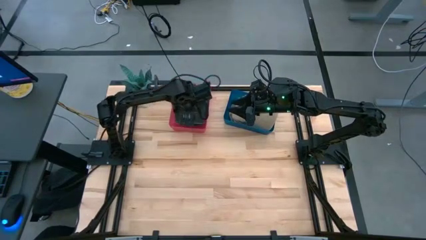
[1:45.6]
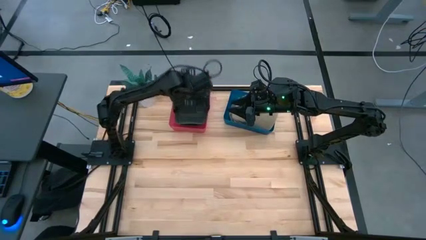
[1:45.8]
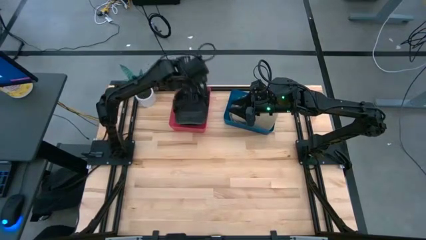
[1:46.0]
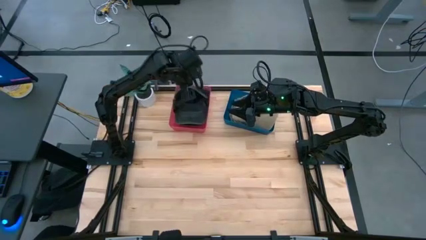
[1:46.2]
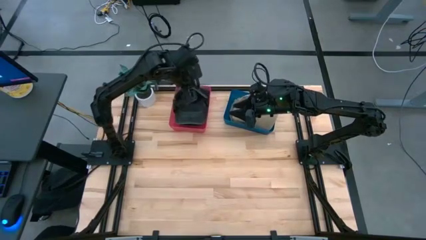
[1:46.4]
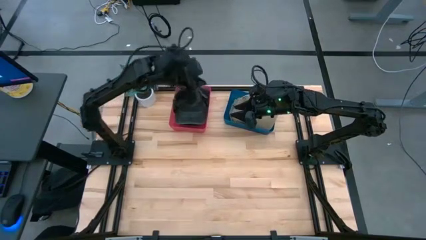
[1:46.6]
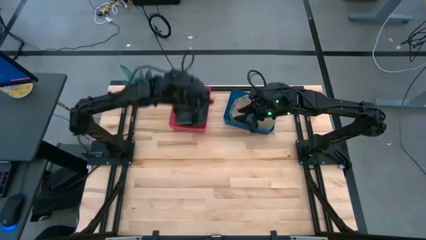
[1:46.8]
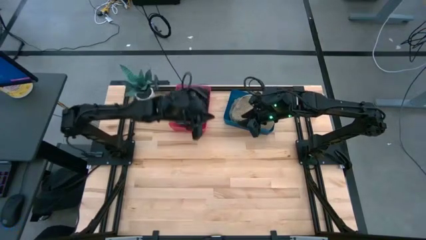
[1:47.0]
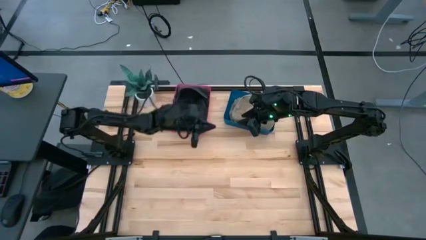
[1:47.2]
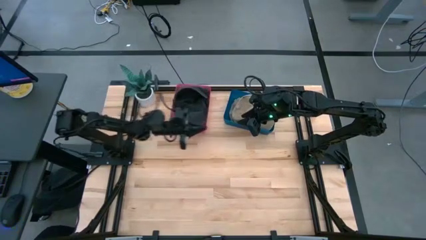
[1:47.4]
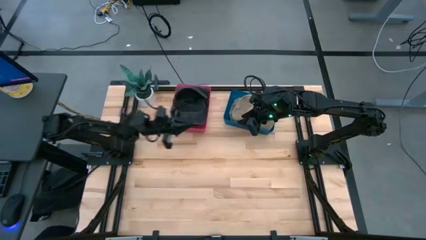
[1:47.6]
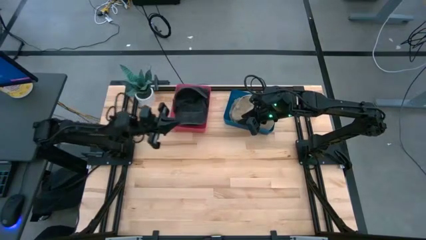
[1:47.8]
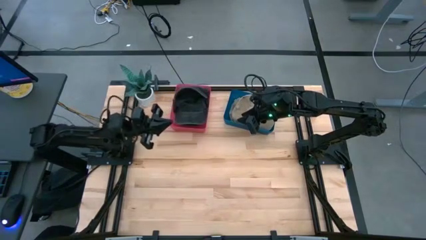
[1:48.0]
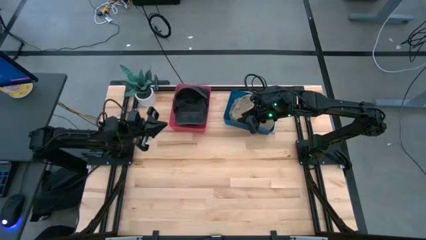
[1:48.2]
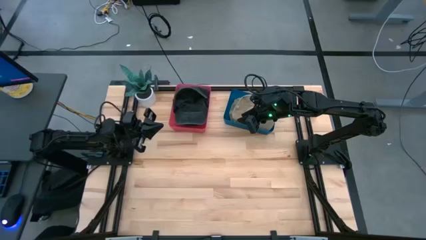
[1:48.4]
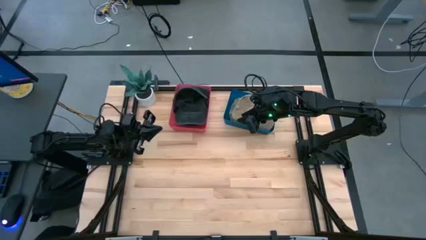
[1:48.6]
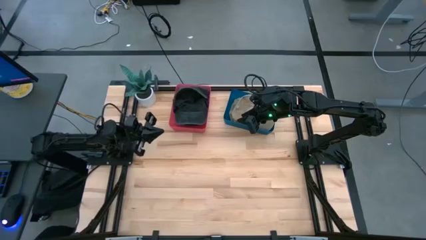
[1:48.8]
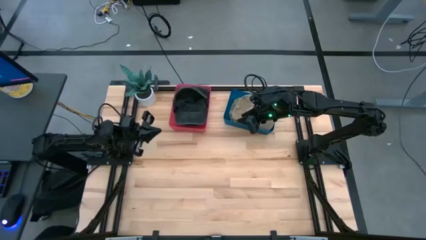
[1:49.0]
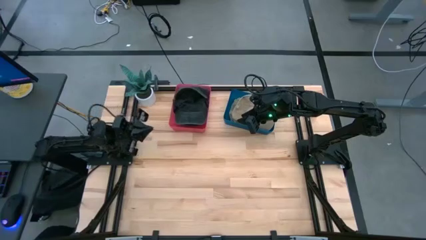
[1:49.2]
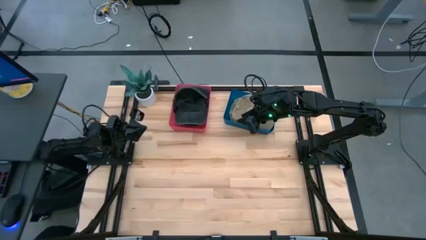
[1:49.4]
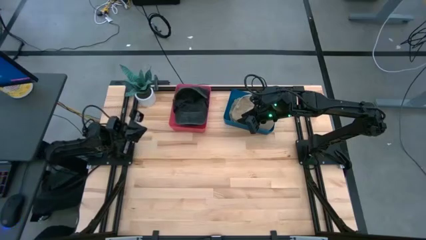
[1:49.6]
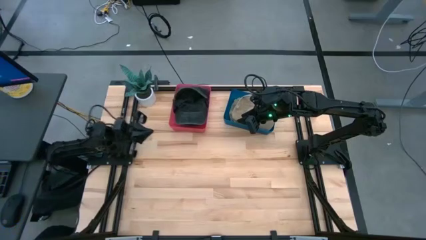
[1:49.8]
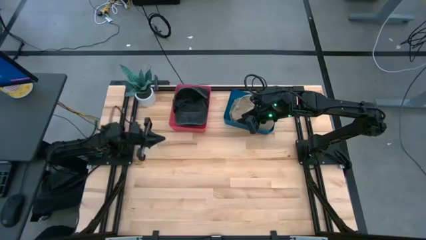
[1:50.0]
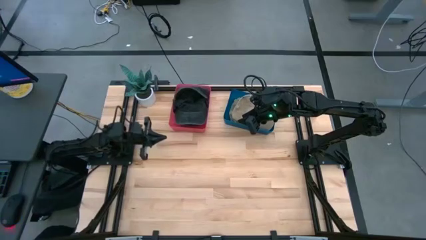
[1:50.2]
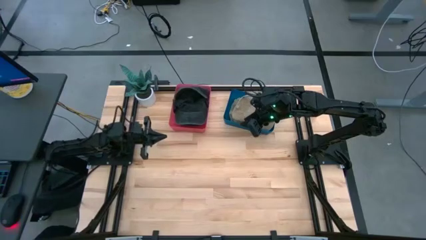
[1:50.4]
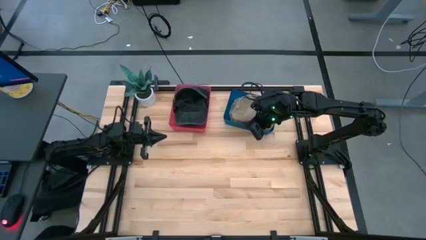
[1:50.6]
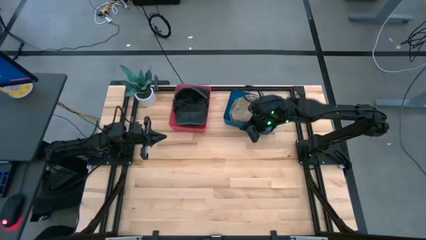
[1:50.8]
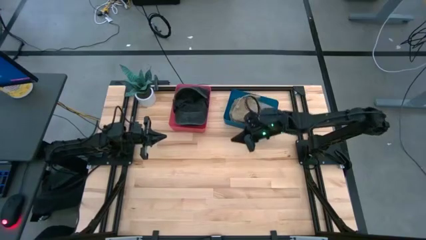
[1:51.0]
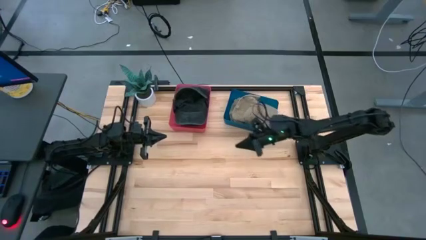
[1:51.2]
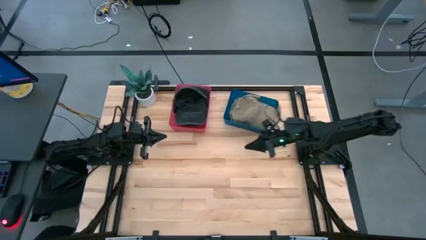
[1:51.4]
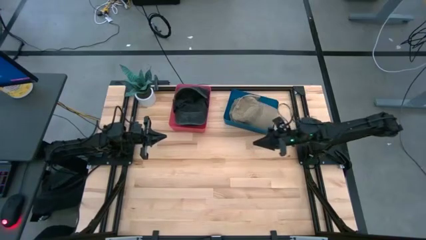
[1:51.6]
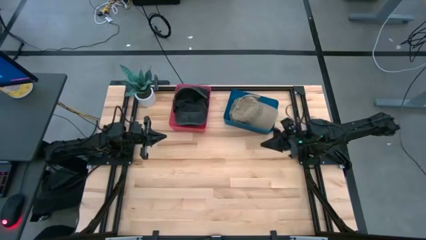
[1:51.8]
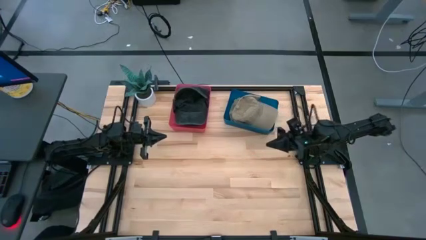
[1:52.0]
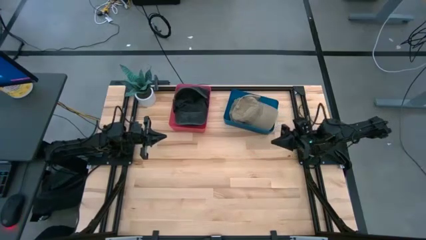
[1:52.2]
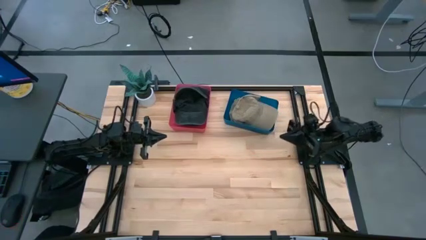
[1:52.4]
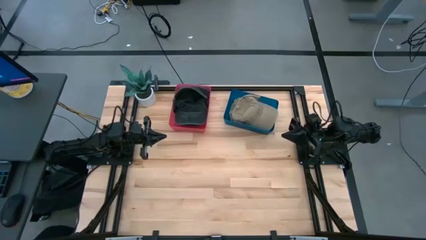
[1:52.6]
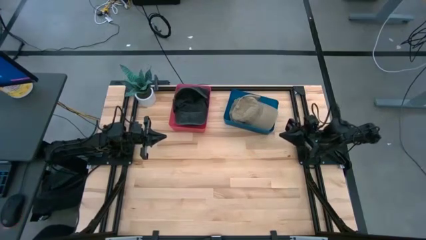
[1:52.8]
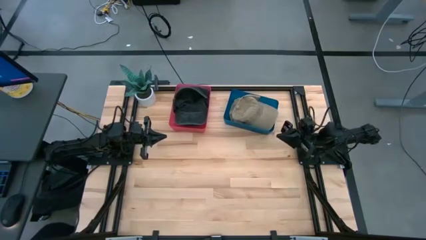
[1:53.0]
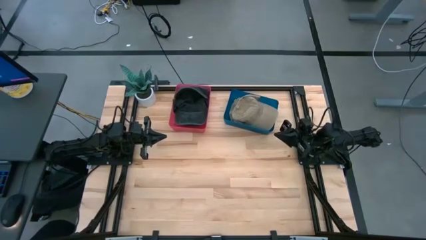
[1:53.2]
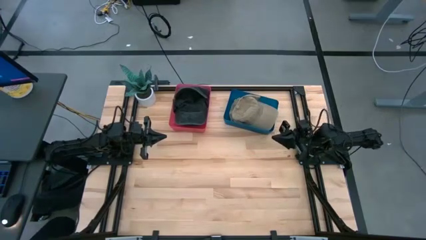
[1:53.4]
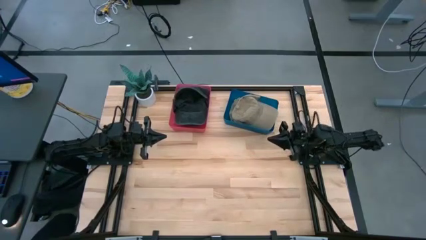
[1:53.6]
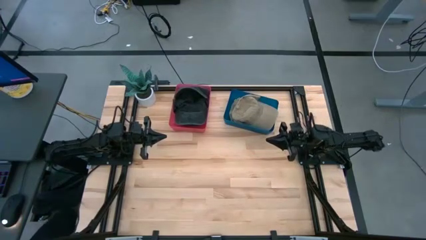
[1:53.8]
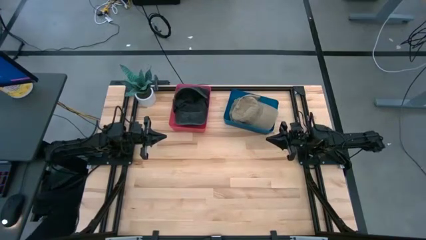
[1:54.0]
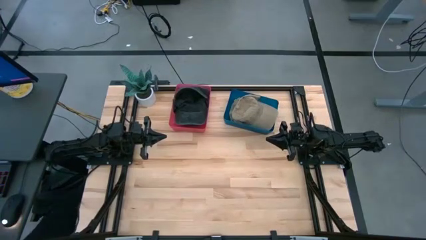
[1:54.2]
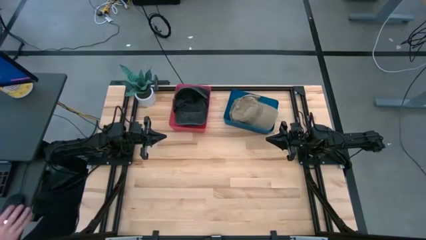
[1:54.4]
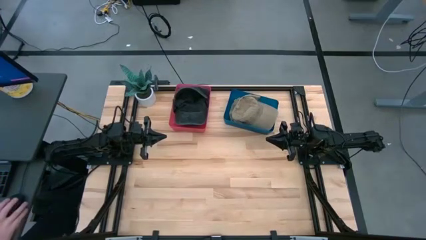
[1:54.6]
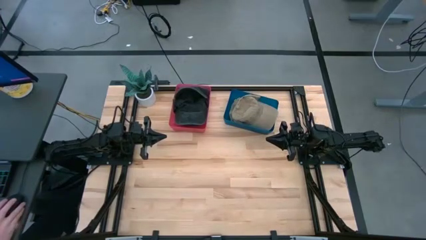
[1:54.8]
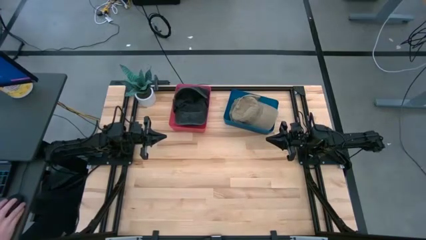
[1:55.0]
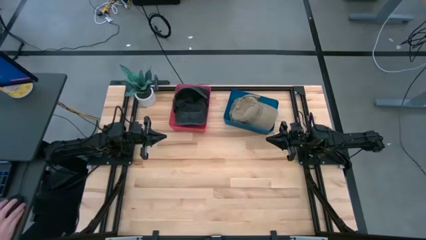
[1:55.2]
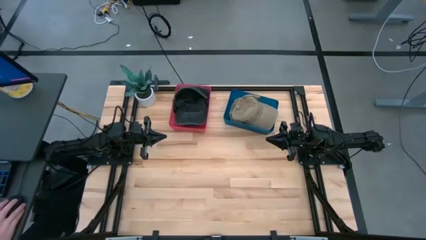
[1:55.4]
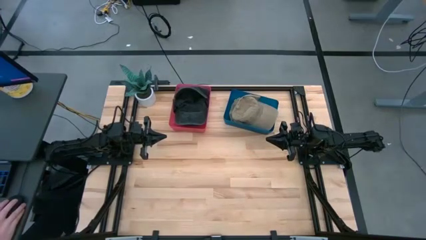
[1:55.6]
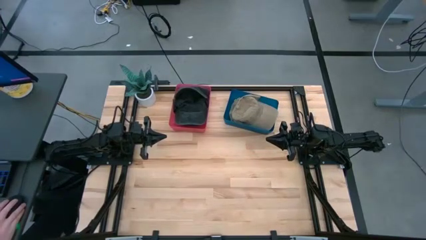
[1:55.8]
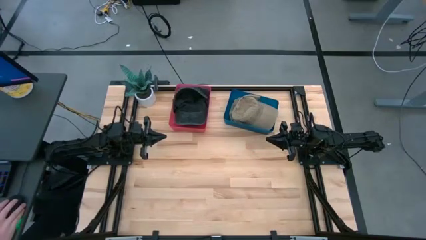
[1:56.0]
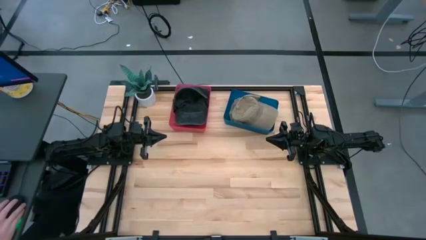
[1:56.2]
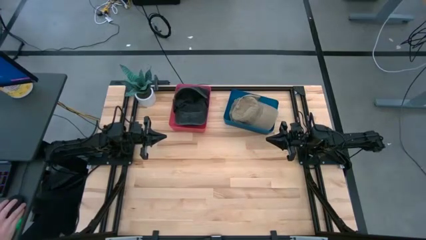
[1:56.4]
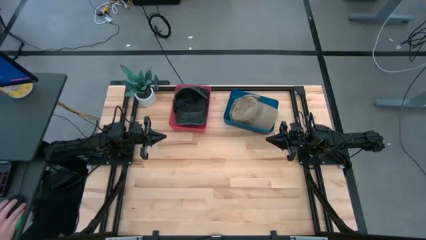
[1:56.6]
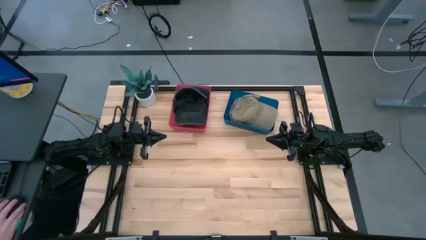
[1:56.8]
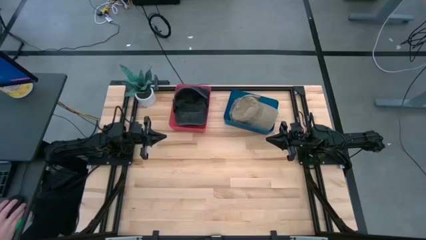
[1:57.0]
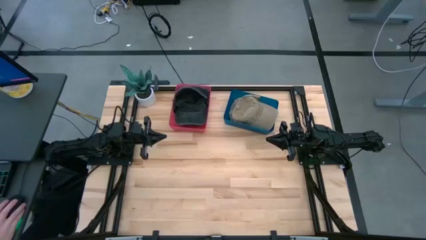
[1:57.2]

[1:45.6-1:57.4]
Task: Pick & Place hat
Return to Home Position

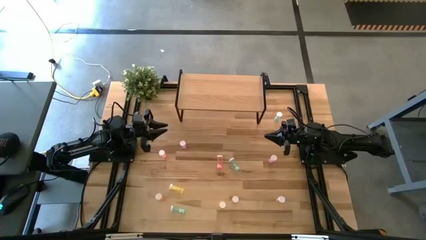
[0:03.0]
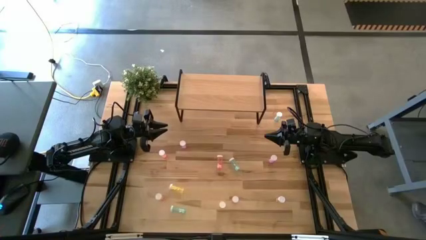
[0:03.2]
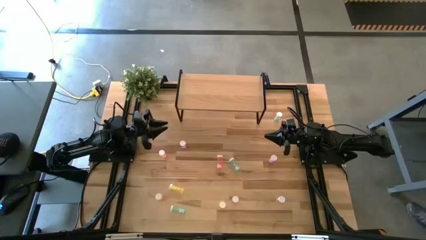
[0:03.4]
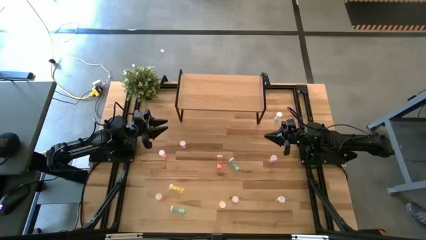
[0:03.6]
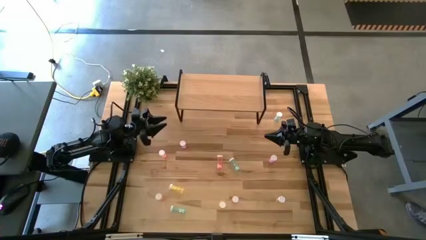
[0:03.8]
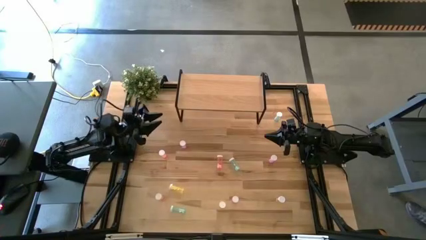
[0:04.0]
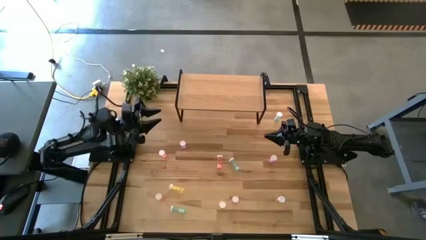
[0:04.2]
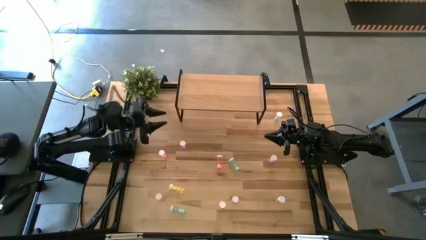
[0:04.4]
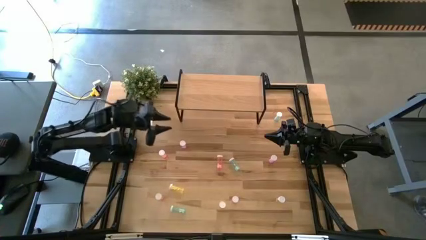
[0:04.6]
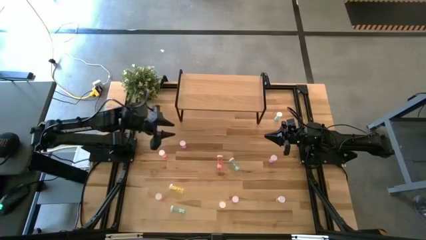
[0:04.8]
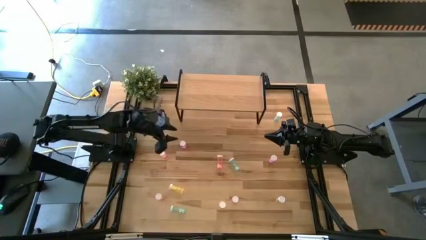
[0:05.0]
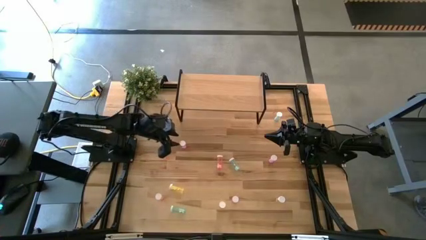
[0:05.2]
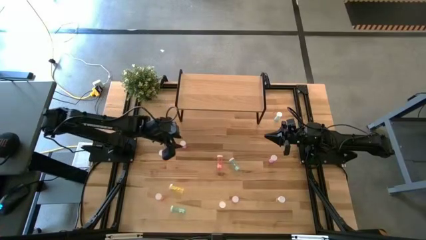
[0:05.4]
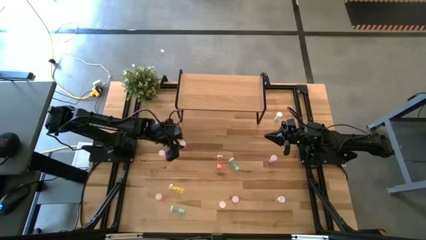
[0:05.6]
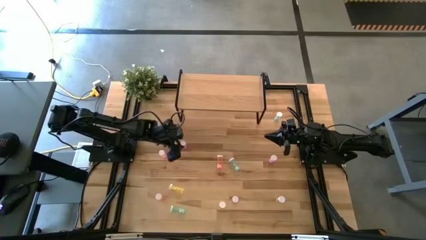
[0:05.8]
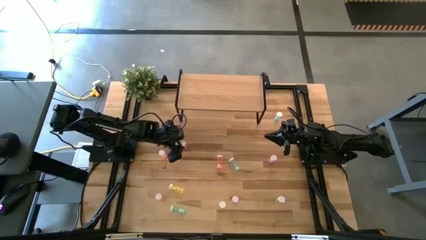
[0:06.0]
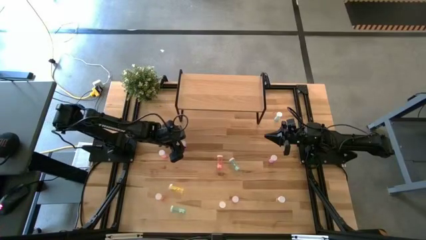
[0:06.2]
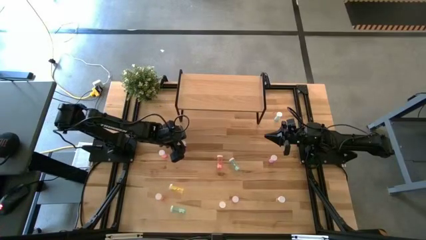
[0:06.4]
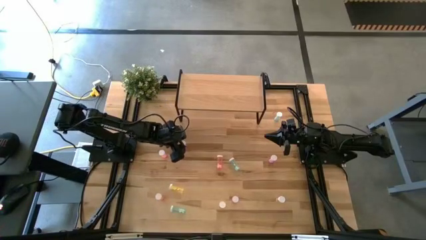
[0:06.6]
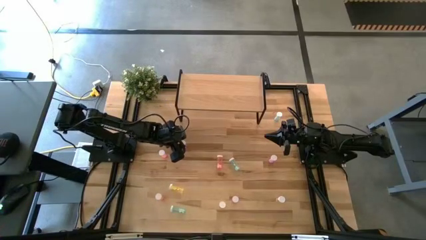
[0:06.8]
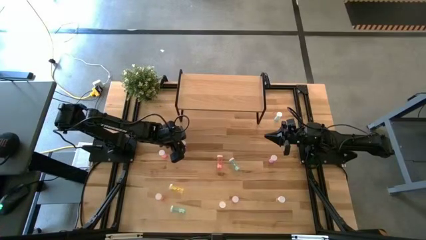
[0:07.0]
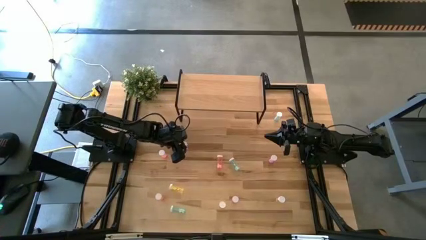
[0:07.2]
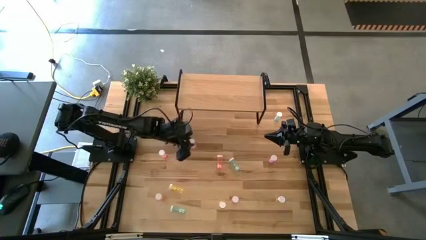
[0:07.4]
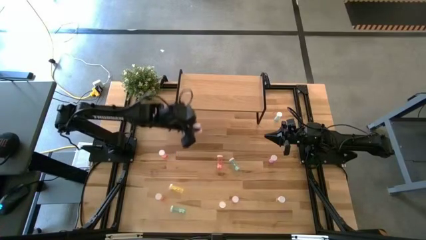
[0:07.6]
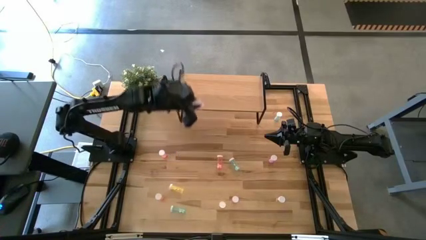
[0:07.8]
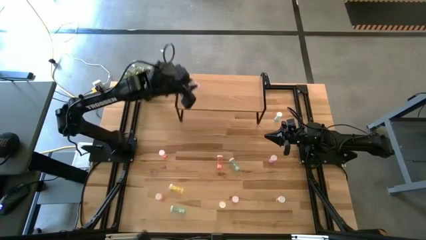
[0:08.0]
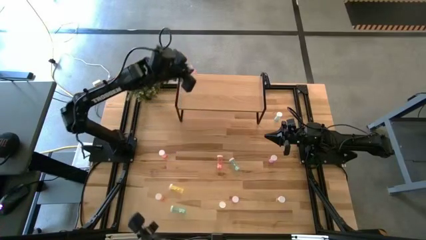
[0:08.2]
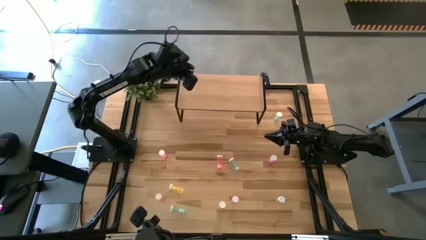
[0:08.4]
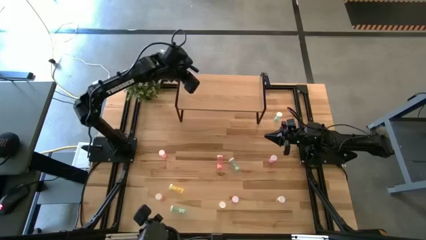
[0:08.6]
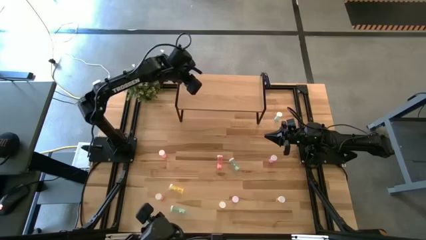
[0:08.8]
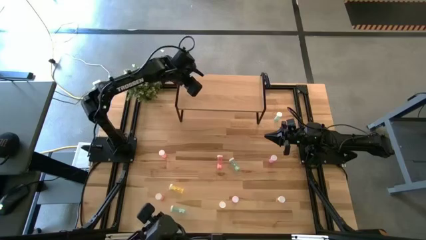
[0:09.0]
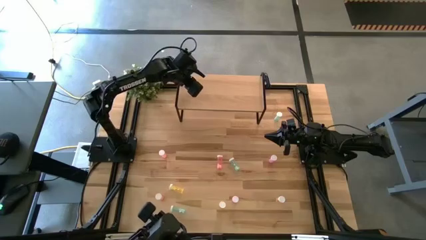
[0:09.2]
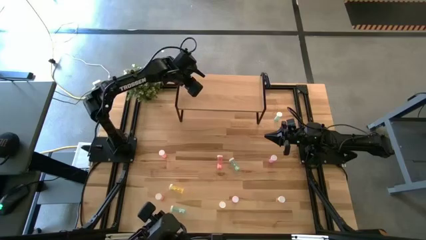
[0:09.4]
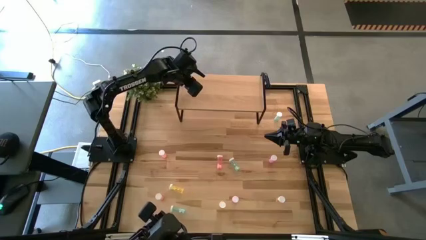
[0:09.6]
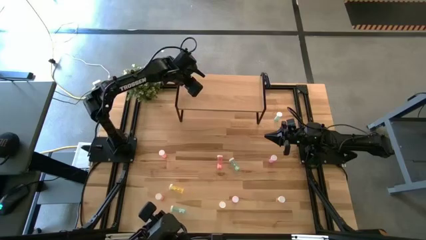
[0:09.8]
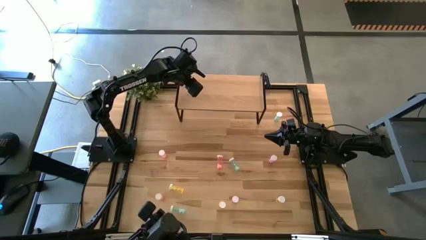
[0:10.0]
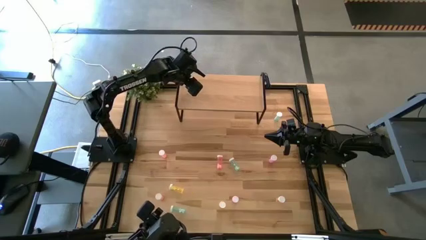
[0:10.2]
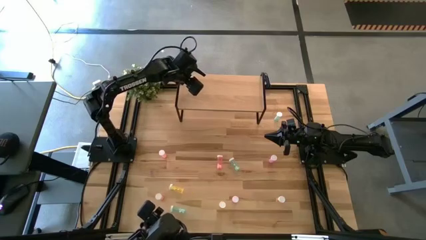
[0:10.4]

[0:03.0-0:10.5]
Task: Pick and place medicine bottles onto shelf by color
Put the top left purple pill bottle on the shelf
